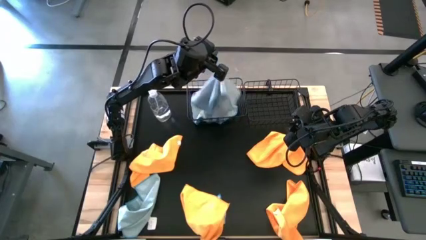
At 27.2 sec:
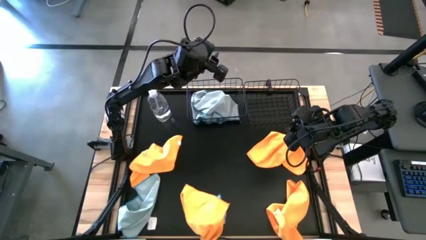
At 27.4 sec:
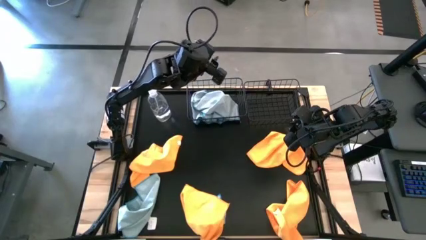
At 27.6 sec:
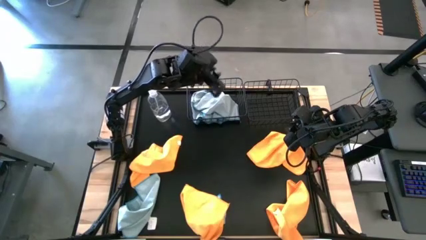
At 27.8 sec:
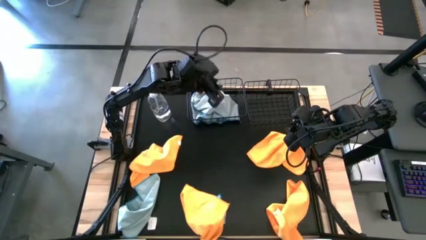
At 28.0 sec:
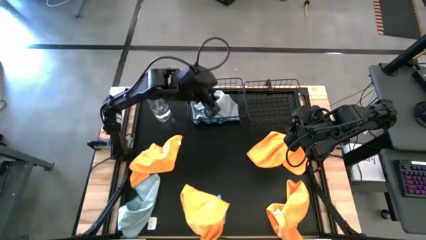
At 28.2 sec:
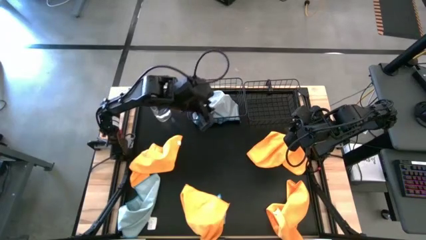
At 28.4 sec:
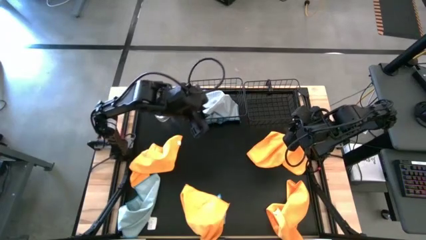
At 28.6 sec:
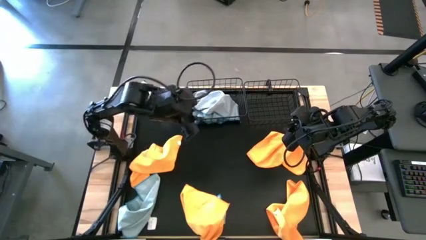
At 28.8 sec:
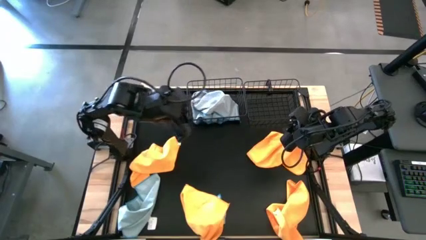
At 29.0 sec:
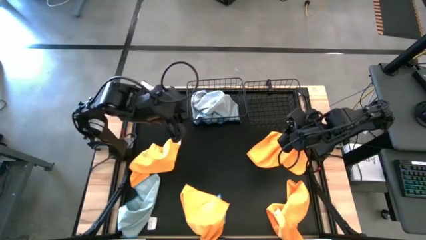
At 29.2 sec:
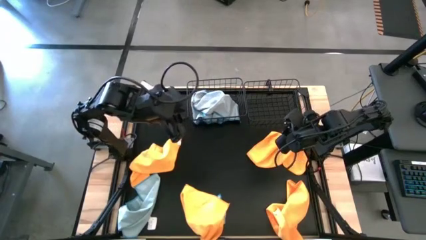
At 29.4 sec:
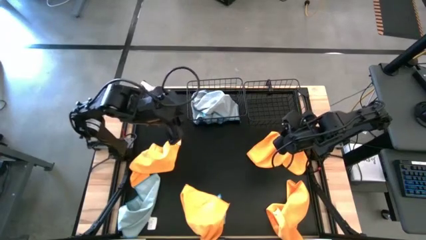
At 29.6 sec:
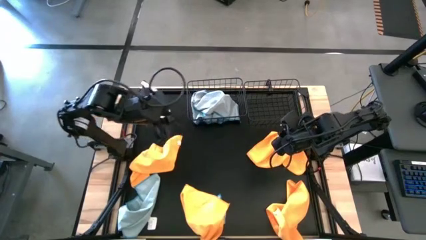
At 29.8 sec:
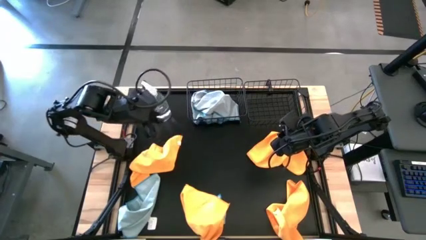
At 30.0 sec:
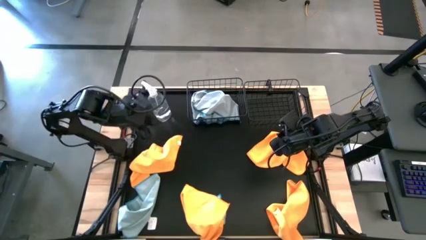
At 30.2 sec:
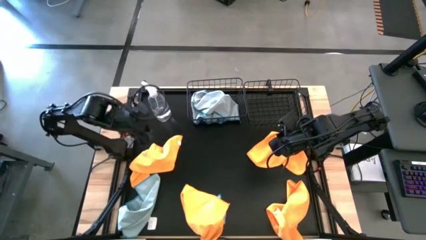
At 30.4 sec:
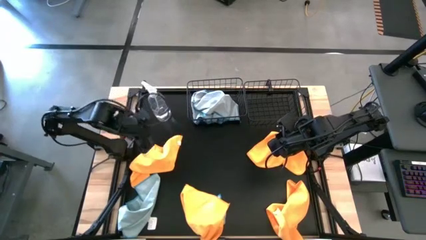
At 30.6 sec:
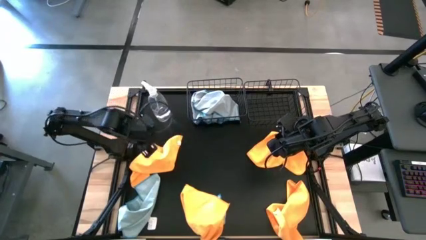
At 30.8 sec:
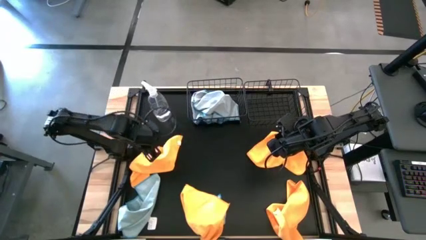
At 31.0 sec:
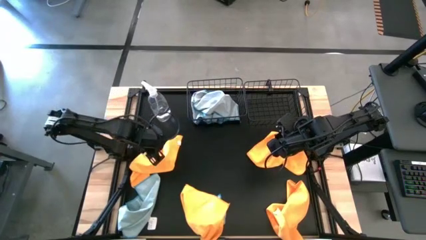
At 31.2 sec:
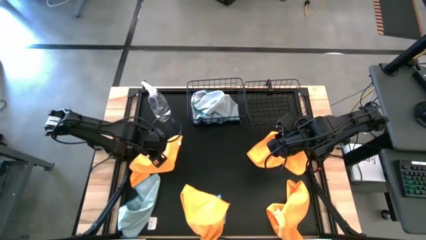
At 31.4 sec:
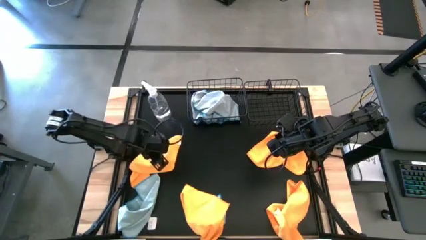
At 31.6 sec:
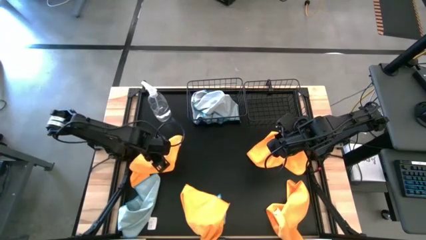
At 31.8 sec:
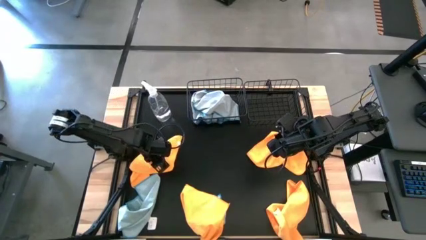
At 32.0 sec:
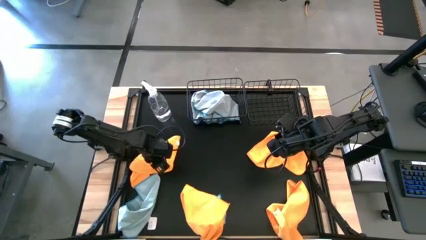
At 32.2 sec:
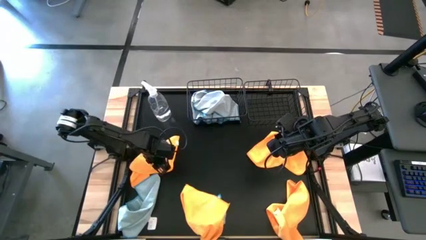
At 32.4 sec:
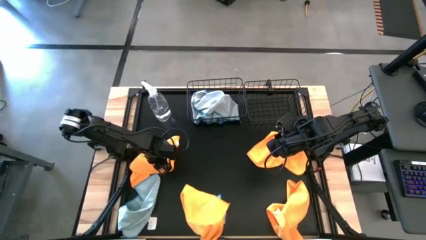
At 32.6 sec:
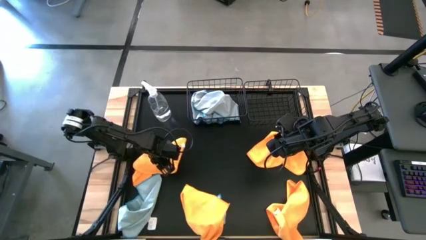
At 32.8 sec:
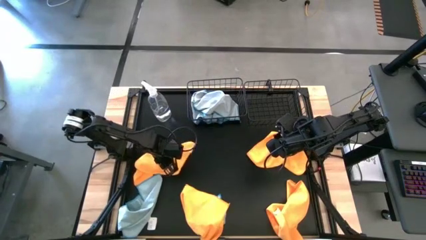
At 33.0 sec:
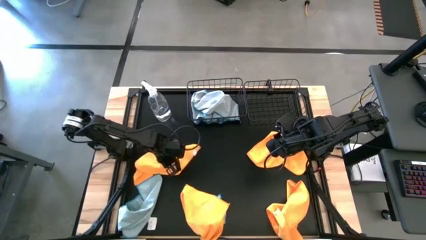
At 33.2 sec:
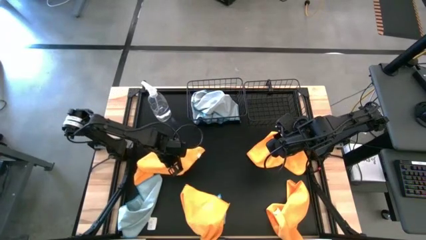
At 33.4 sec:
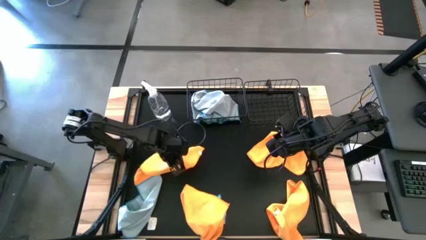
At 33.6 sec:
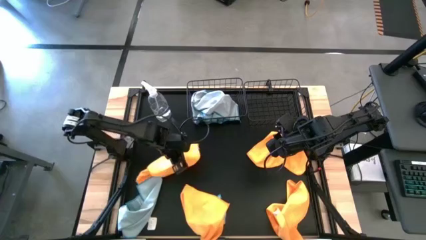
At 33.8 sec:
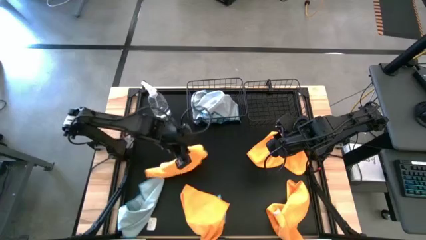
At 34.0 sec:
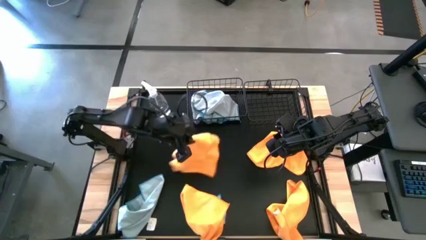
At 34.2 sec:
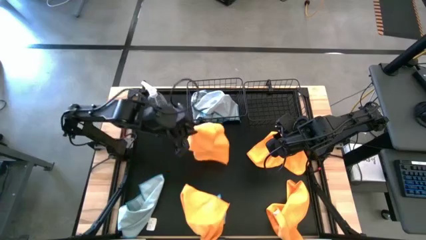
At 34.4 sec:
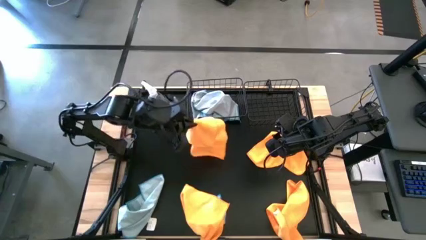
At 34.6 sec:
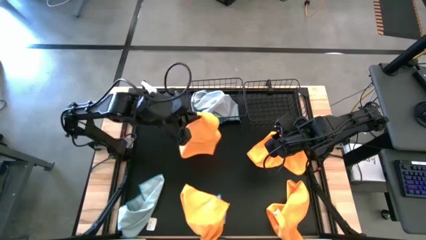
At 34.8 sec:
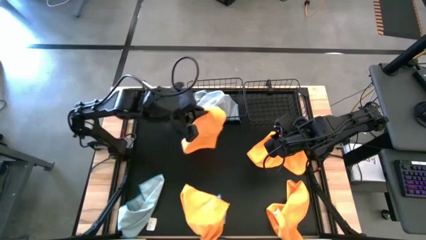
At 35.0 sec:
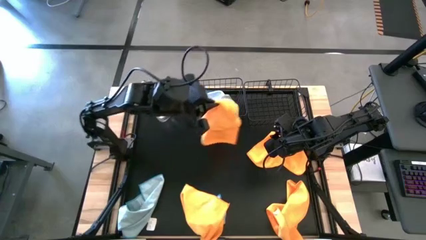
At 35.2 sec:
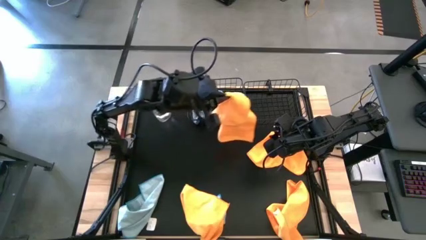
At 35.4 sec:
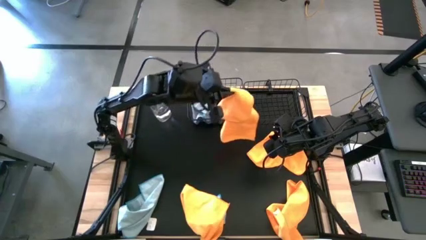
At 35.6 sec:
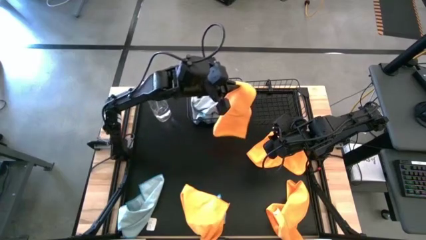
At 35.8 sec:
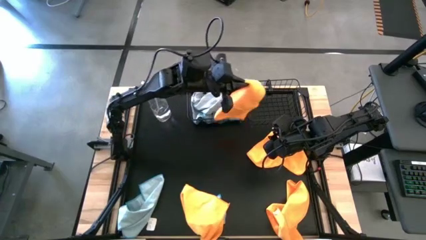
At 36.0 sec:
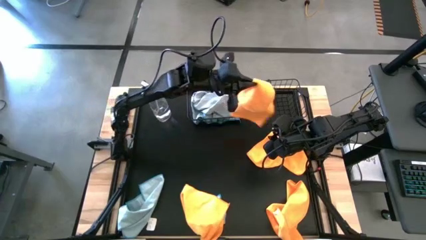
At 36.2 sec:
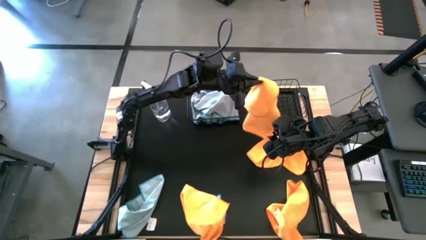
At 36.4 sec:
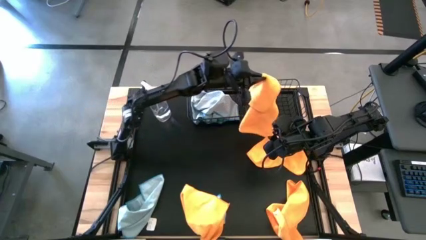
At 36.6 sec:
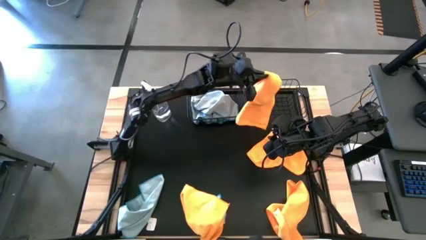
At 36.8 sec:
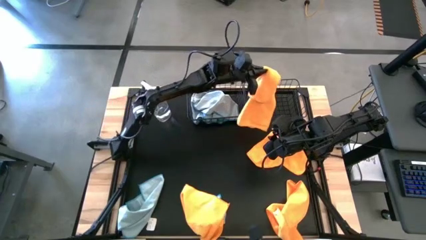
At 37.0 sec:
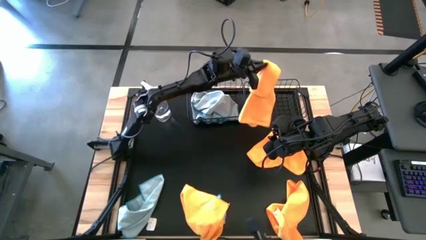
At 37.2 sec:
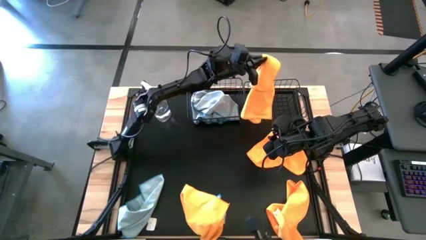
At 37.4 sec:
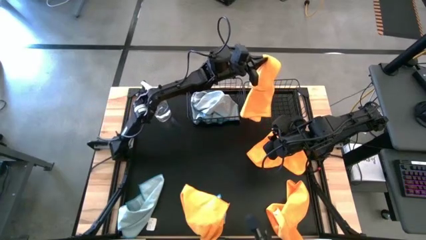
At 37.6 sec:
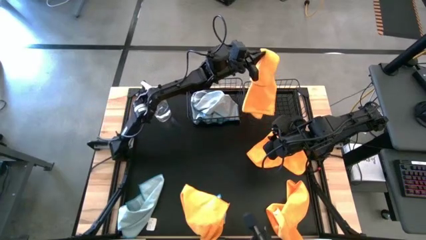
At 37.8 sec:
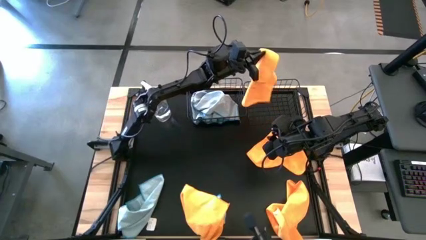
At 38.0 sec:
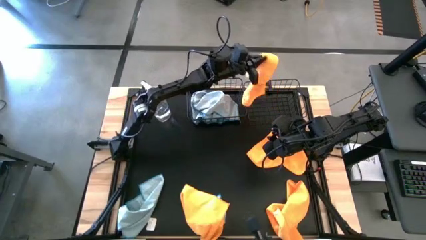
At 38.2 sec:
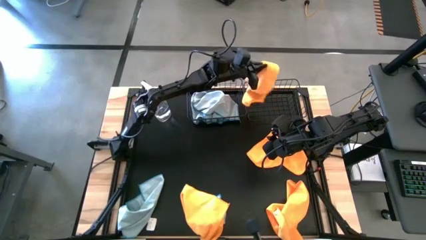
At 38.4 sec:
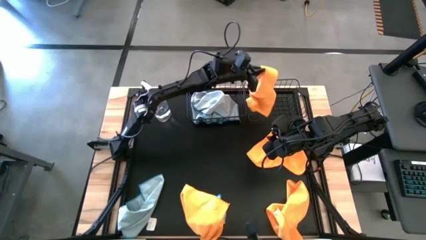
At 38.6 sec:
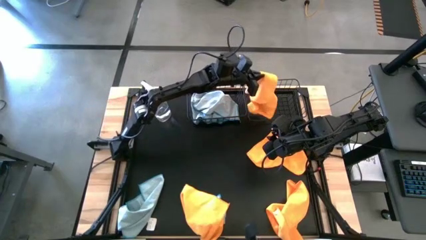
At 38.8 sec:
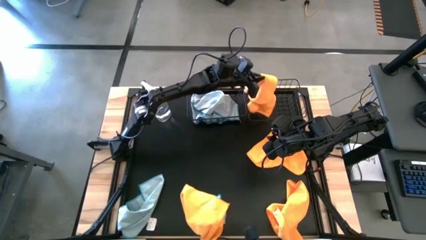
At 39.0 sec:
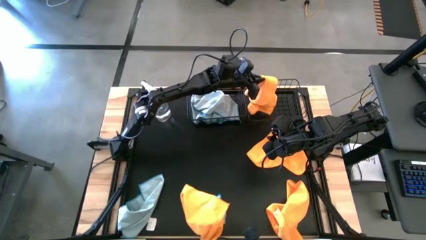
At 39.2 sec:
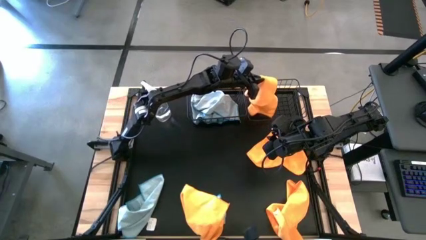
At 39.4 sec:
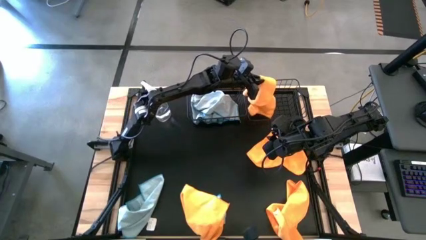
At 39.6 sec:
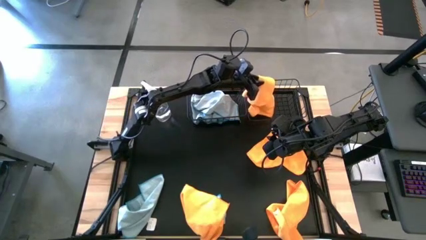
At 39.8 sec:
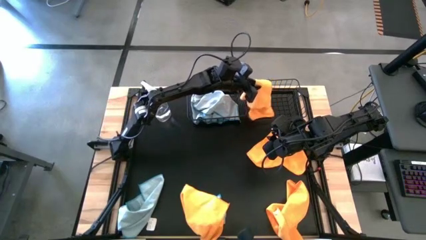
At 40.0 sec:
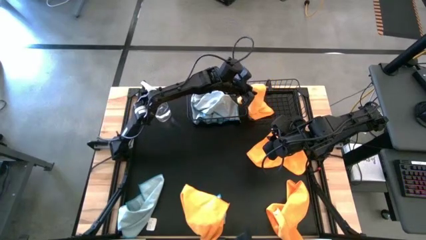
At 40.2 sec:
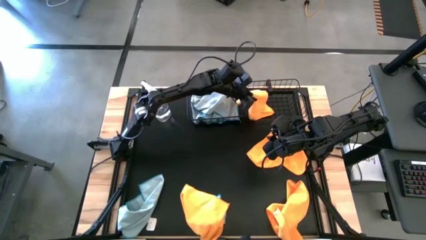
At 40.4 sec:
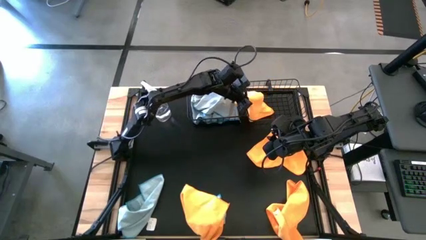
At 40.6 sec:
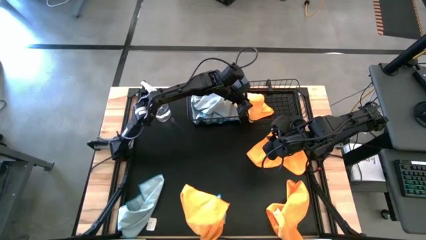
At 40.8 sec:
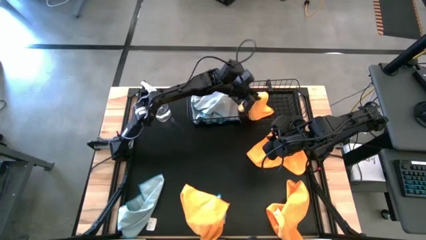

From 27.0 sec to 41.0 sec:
Task: Sort microfiber towel by color & place in baskets
Put the top left orange microfiber towel into the right black wire basket
